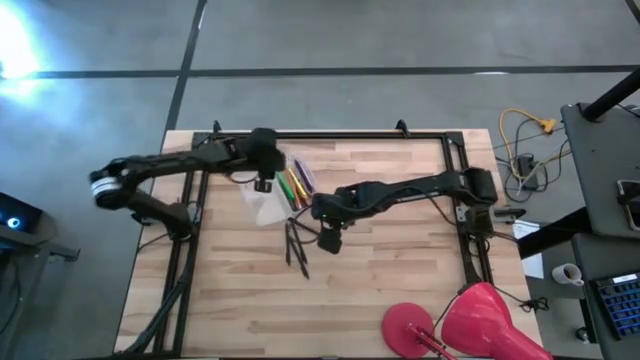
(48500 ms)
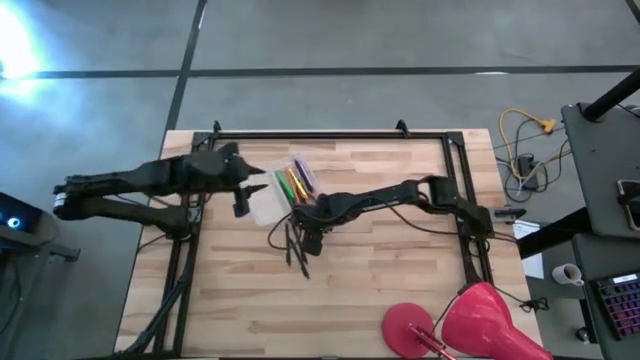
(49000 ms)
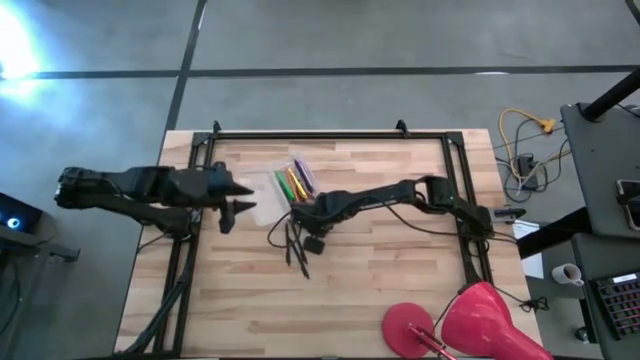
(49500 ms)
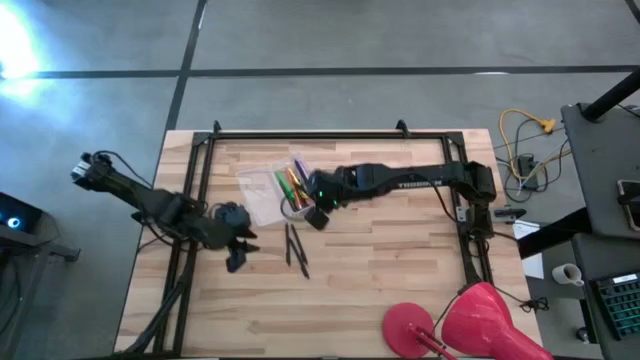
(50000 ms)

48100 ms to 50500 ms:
Task: Pick & place school supplies into a supply box
Put the black pen into the transparent supply box

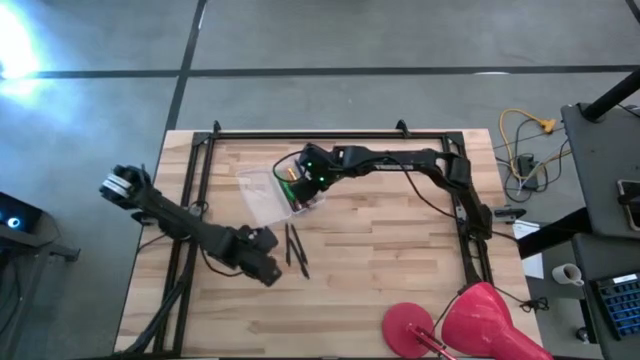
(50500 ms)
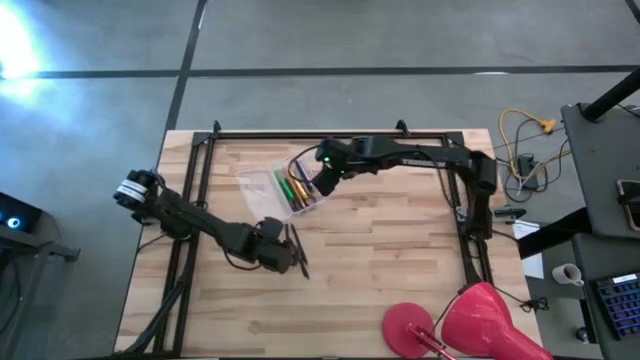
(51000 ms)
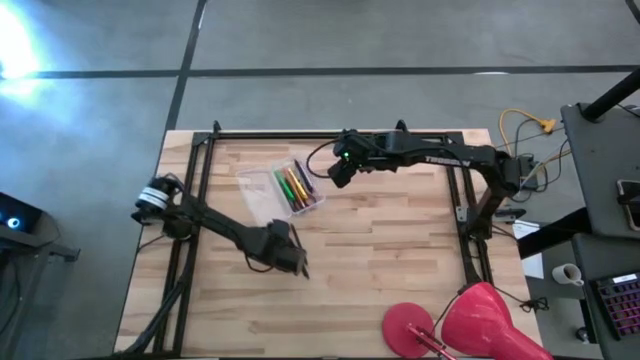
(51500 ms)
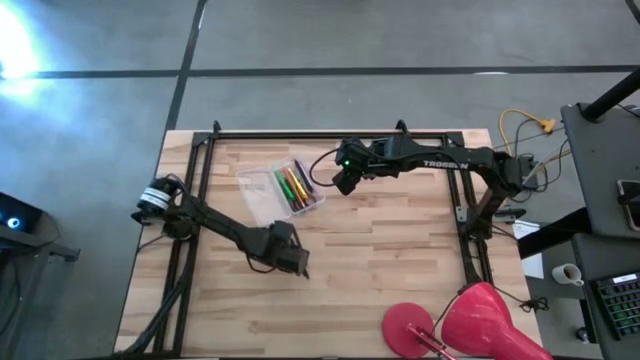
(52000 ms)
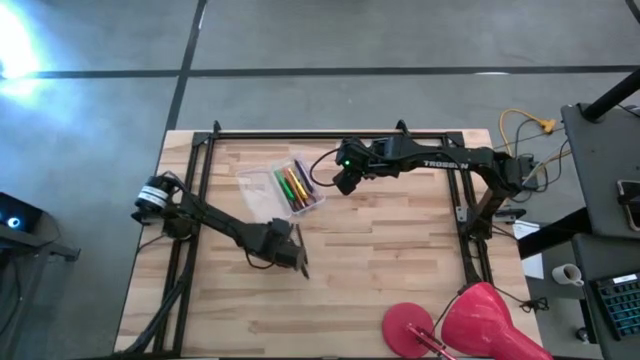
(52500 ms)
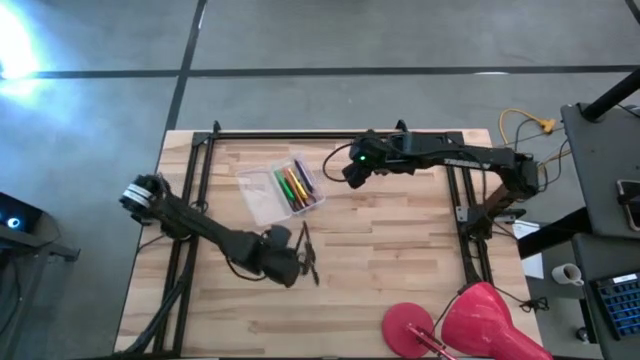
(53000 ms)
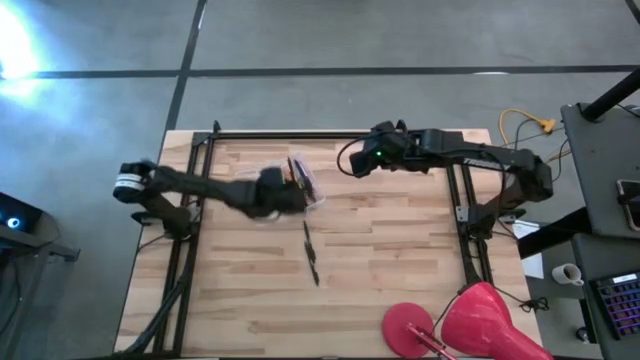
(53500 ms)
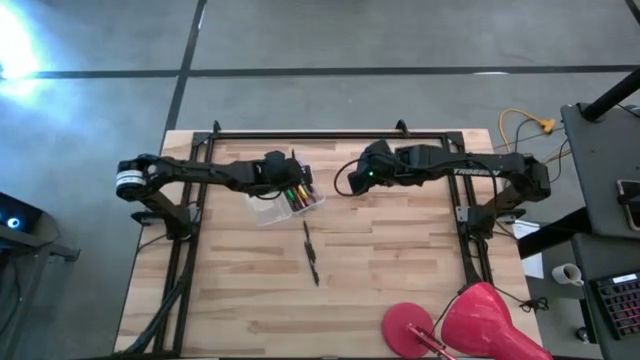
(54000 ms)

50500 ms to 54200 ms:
Put the black pen into the transparent supply box

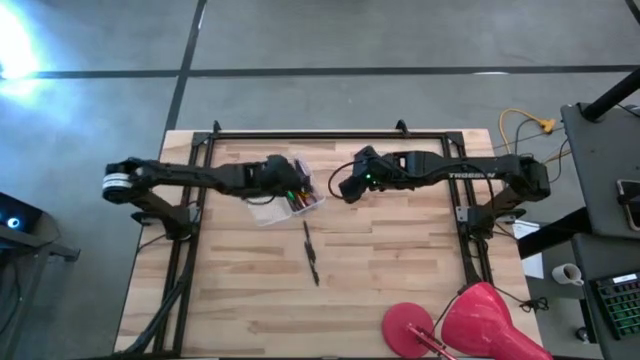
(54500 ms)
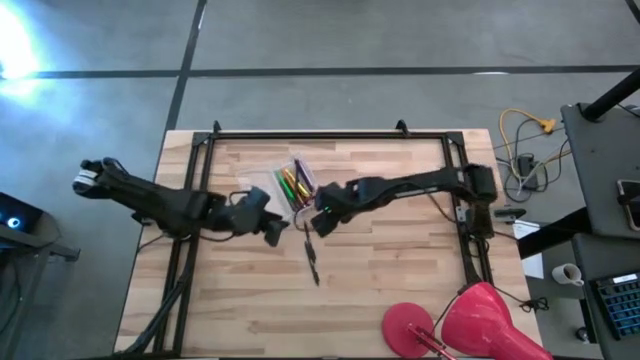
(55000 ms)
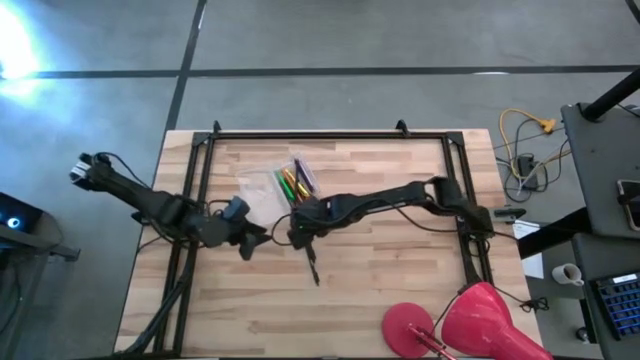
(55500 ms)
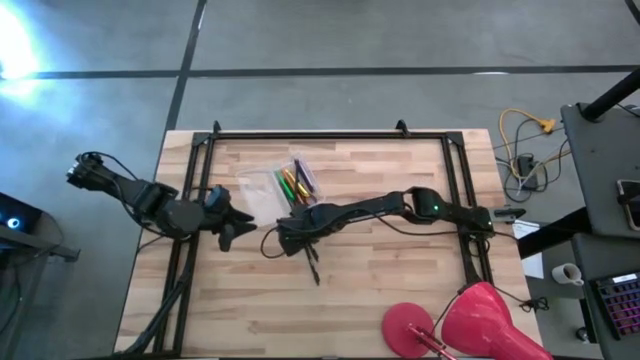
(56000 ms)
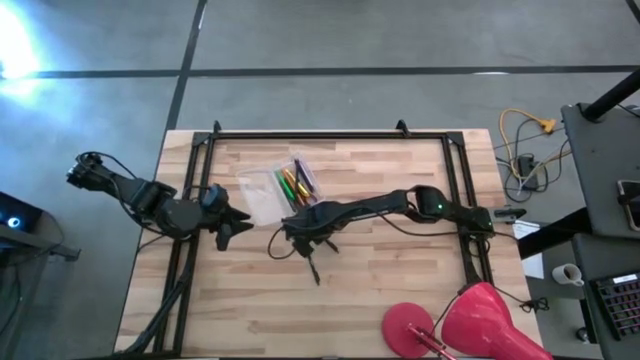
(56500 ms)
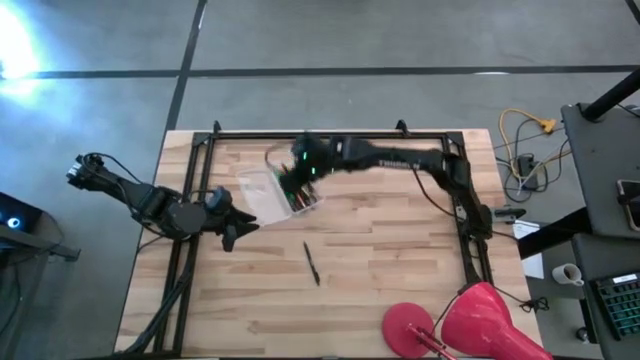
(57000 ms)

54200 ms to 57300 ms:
Put the black pen into the transparent supply box

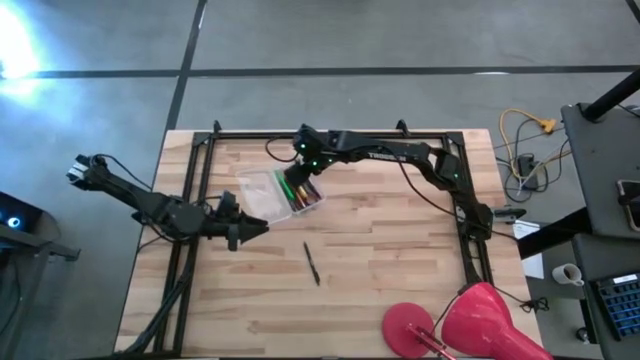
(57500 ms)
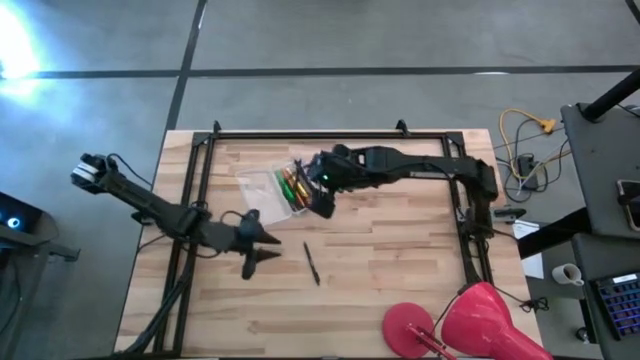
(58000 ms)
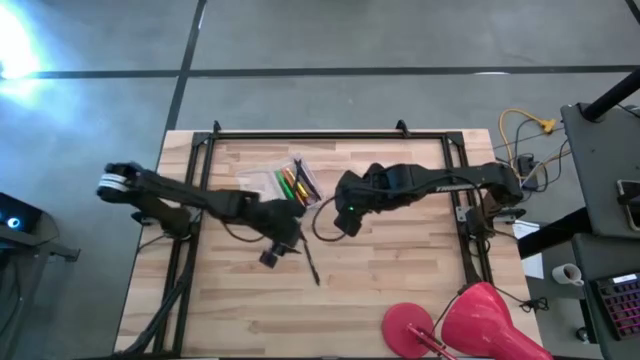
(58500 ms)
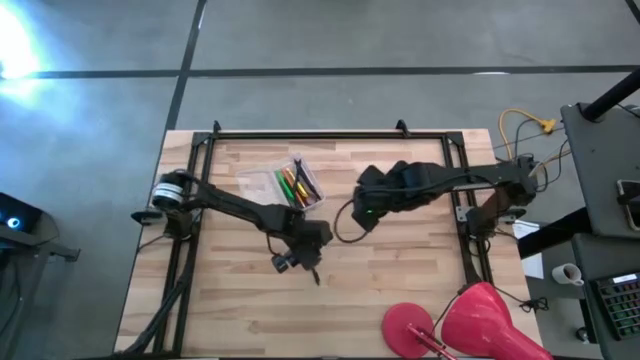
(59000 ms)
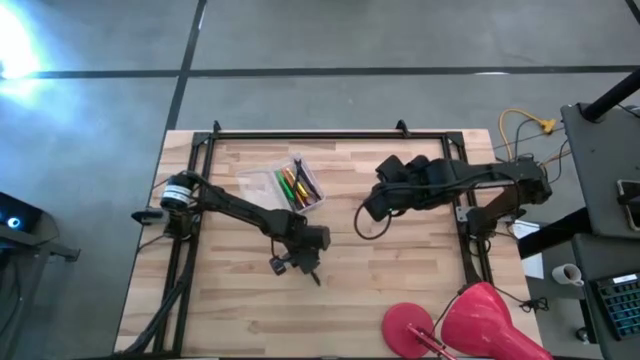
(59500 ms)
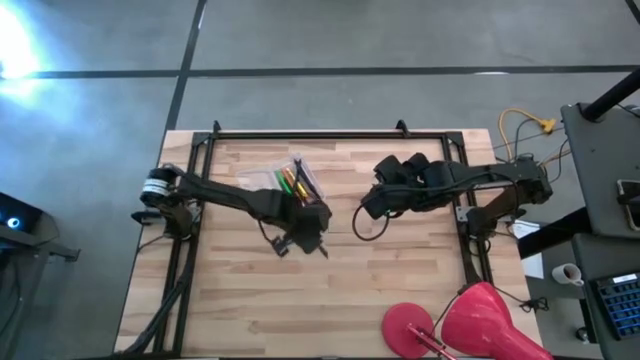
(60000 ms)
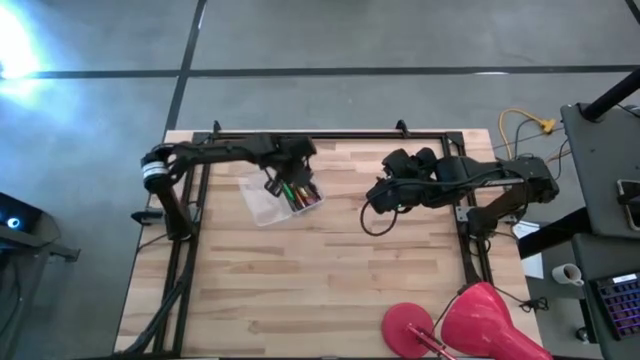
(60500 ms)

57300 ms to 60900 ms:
Put the black pen into the transparent supply box

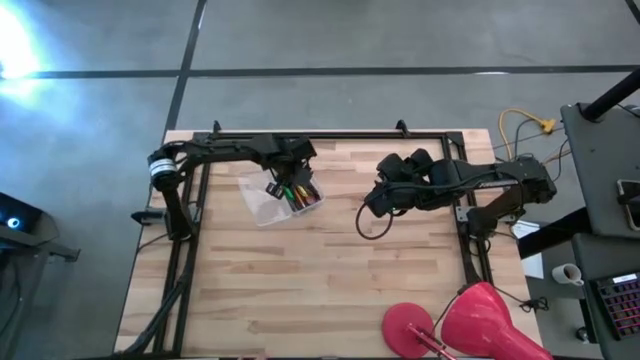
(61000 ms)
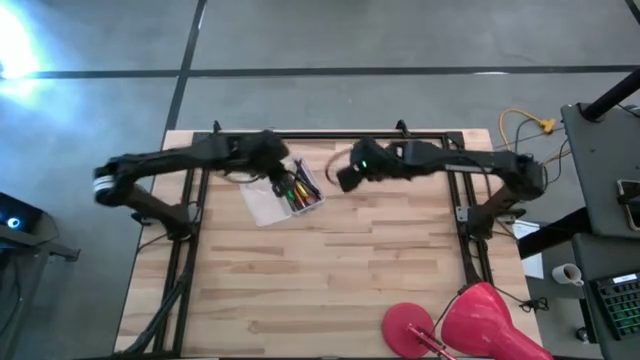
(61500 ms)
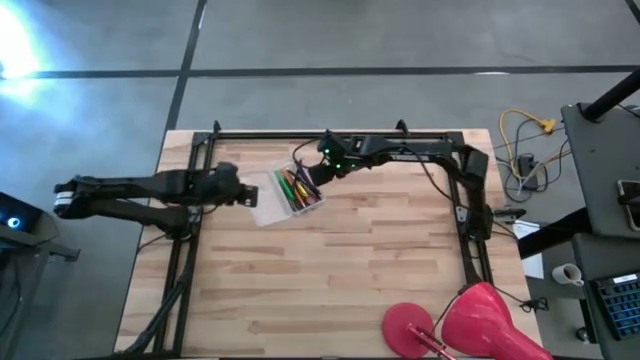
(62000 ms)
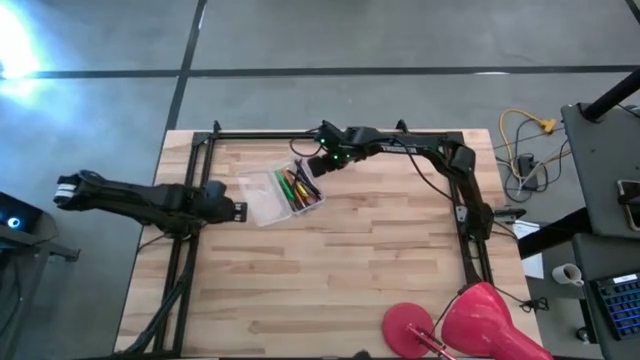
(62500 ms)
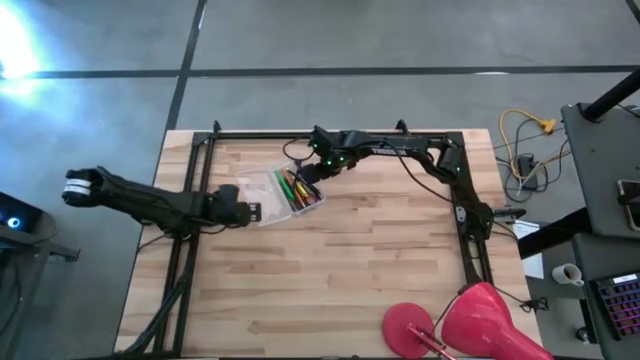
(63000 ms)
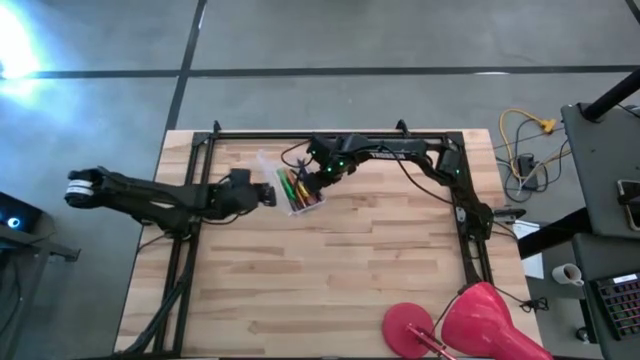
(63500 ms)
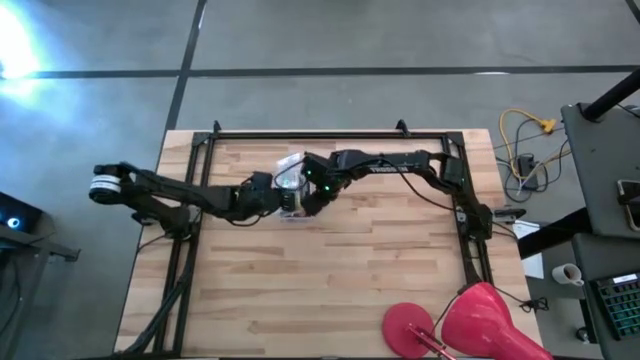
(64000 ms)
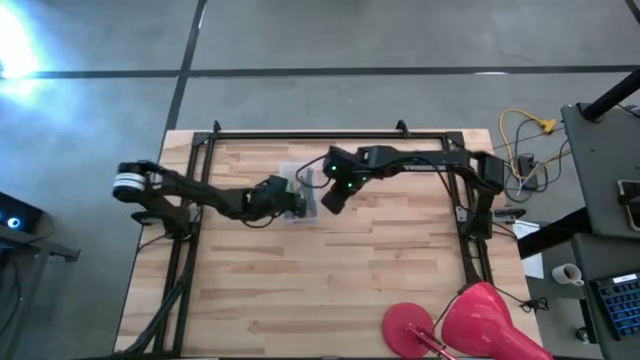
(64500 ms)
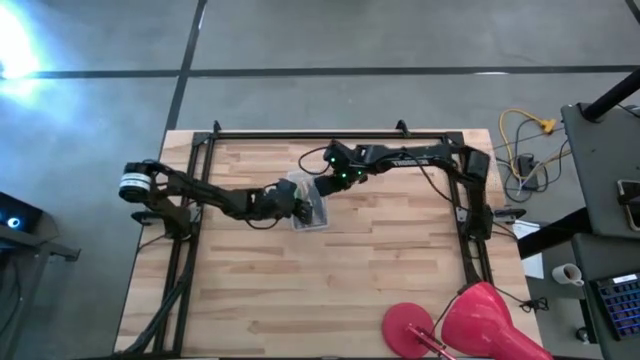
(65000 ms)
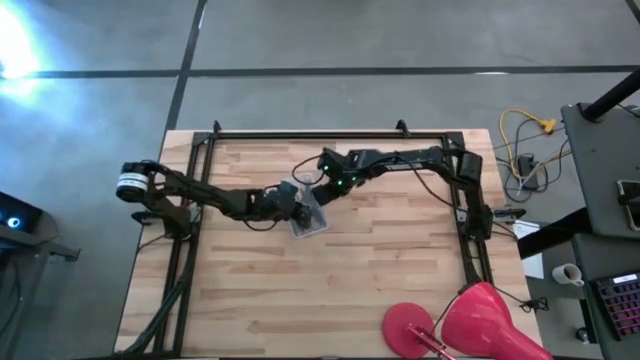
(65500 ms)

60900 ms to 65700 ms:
Close the transparent supply box

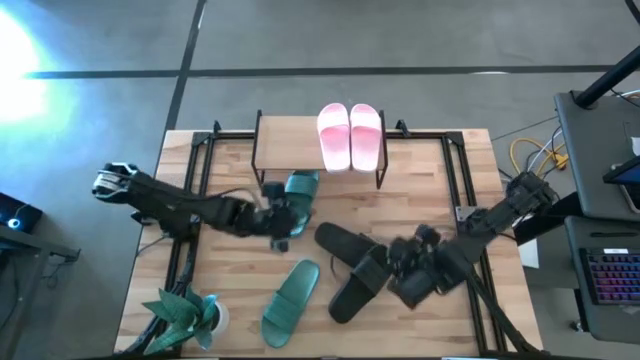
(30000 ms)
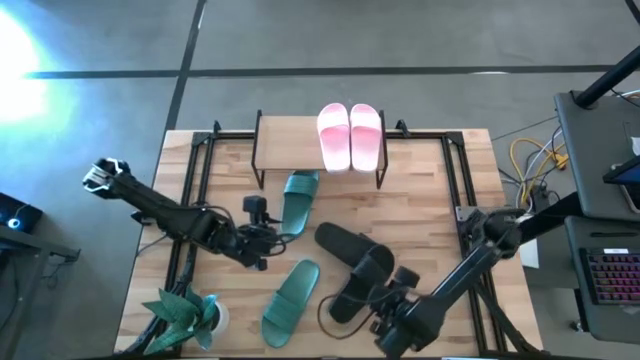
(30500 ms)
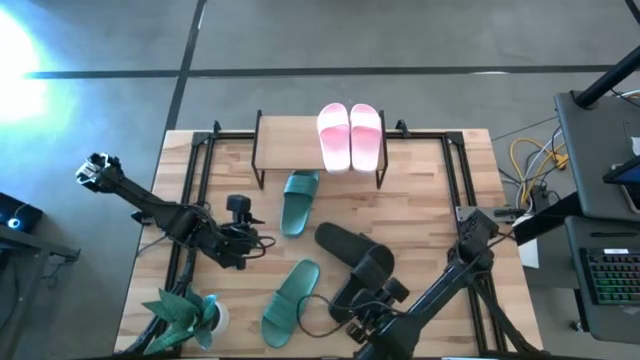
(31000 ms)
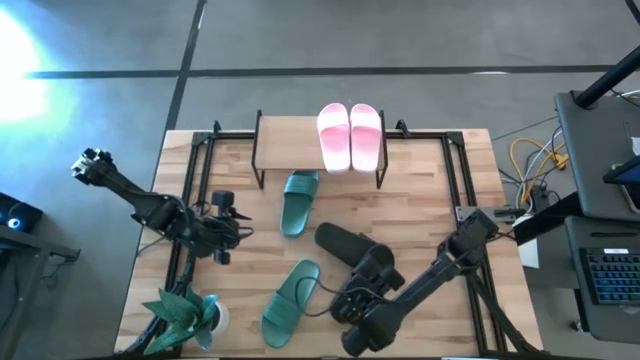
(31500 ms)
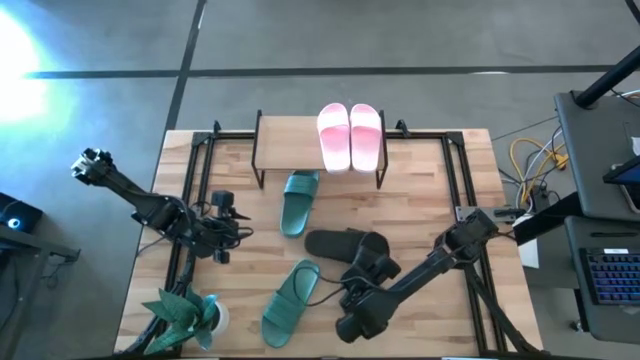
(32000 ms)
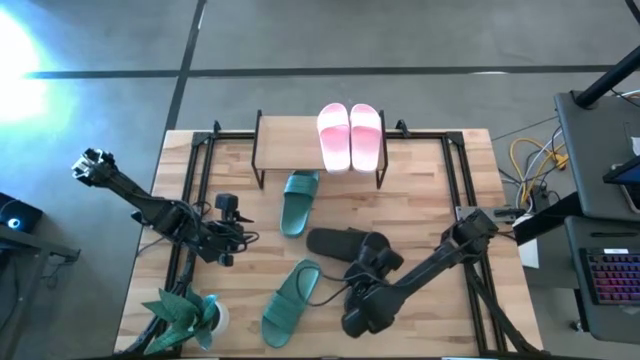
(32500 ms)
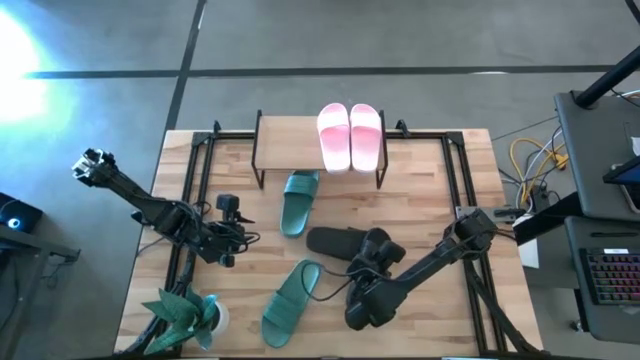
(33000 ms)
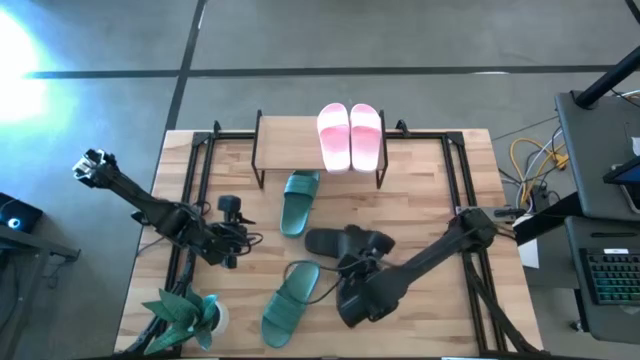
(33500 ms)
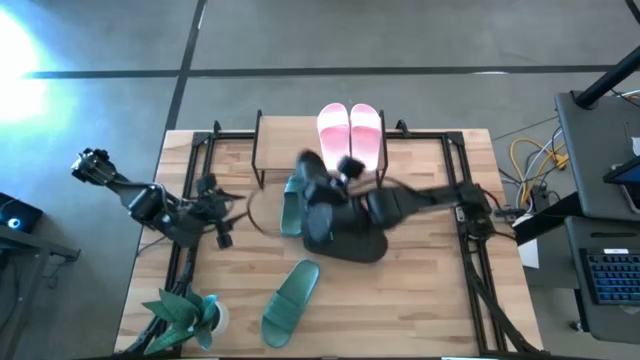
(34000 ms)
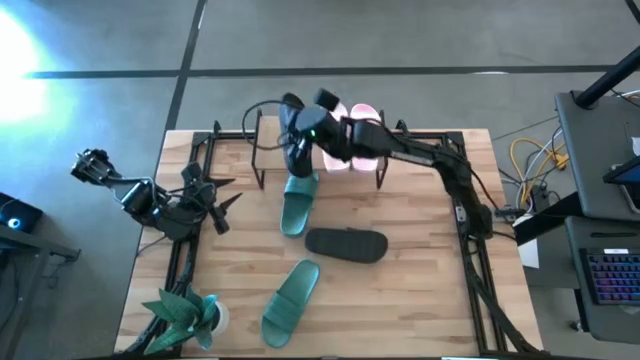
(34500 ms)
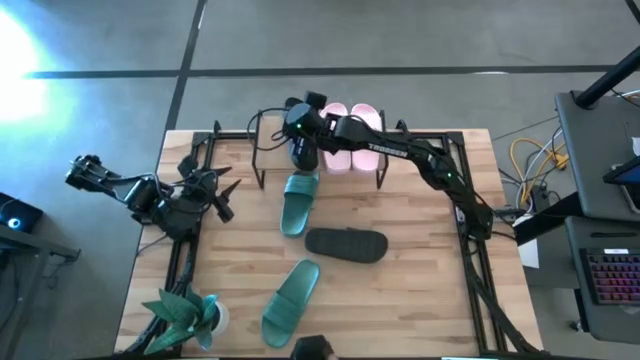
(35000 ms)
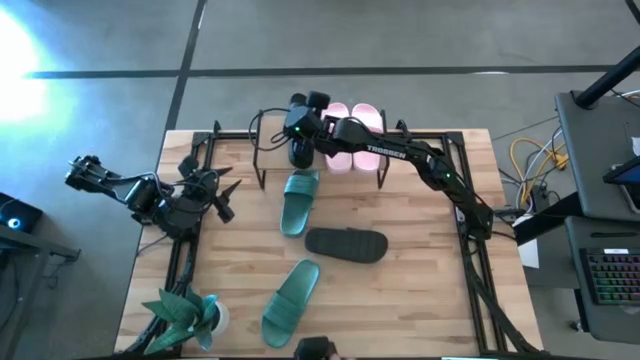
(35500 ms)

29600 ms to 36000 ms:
Task: Pick and place slides into the shelf
Put the bottom black slipper on the shelf
